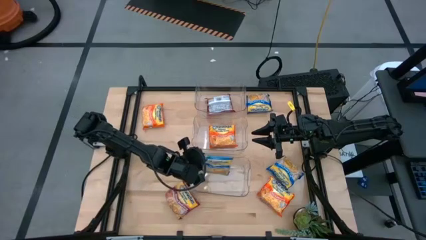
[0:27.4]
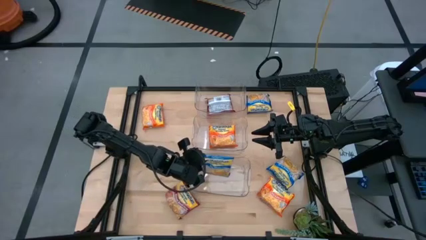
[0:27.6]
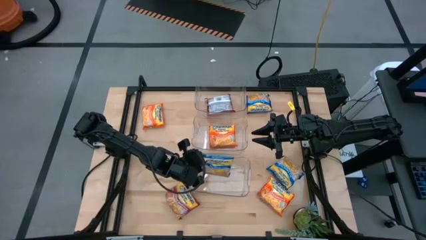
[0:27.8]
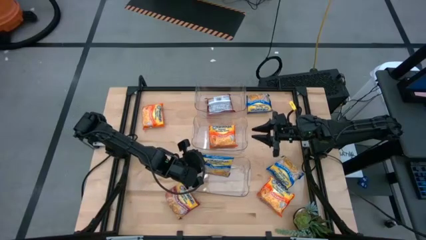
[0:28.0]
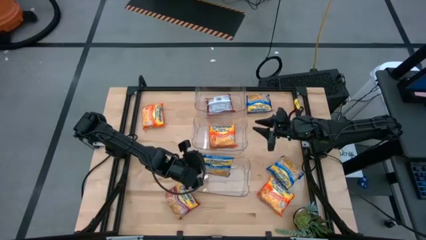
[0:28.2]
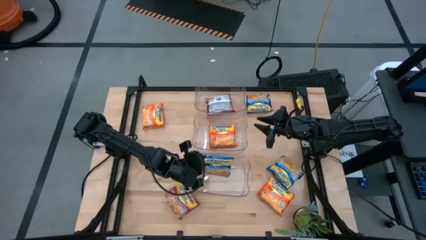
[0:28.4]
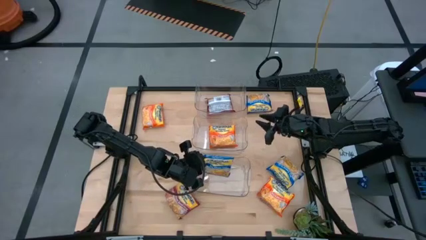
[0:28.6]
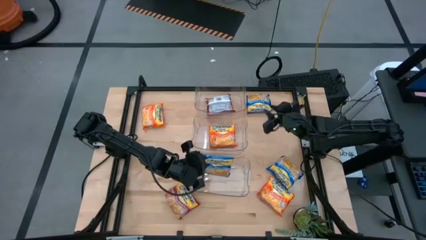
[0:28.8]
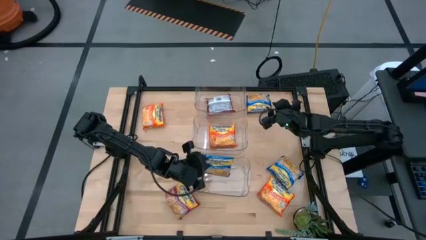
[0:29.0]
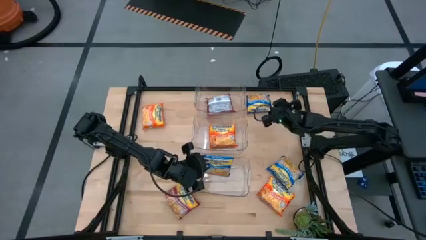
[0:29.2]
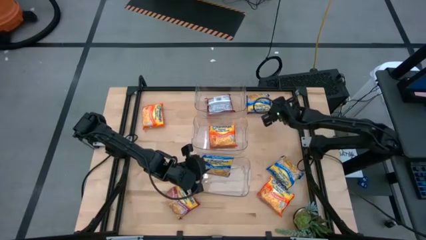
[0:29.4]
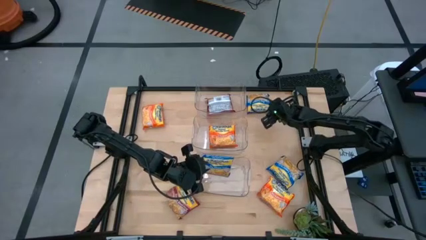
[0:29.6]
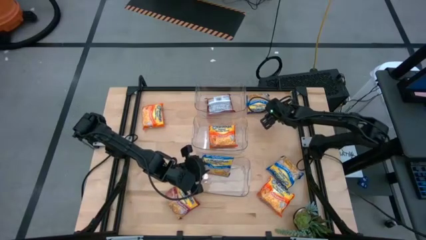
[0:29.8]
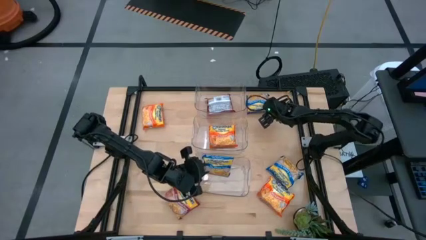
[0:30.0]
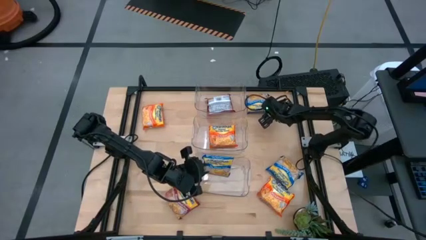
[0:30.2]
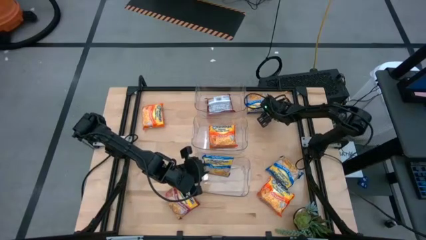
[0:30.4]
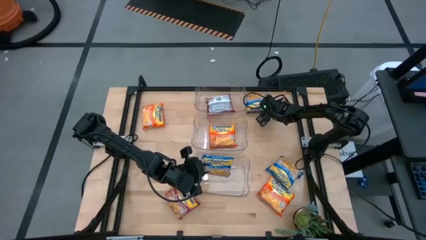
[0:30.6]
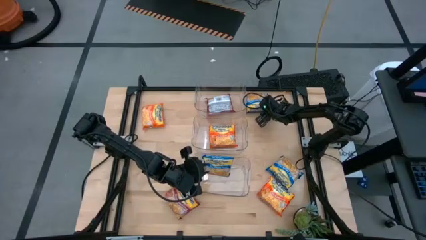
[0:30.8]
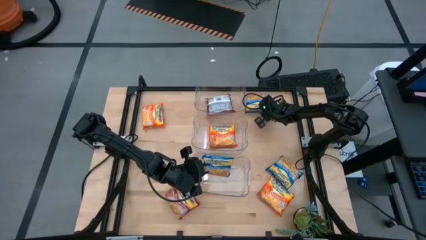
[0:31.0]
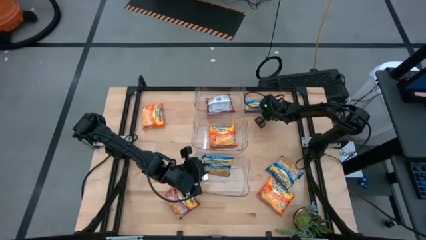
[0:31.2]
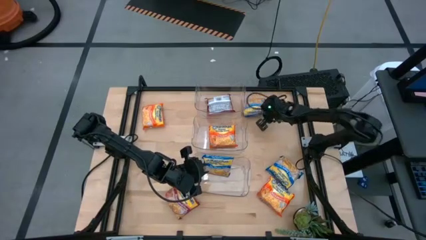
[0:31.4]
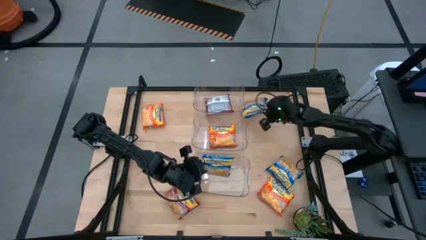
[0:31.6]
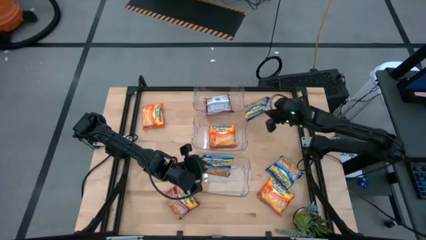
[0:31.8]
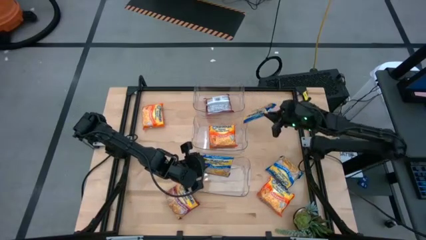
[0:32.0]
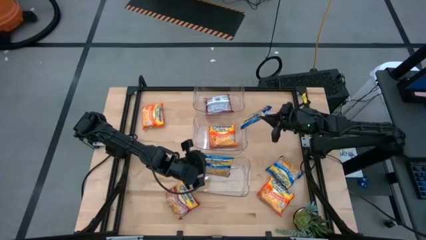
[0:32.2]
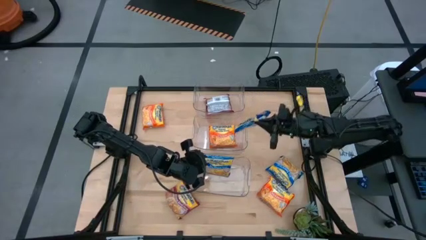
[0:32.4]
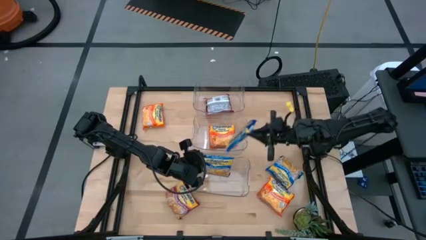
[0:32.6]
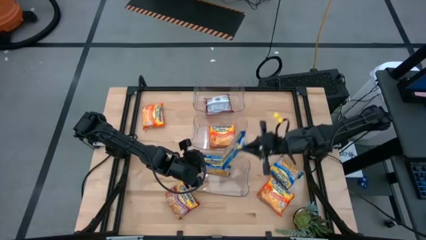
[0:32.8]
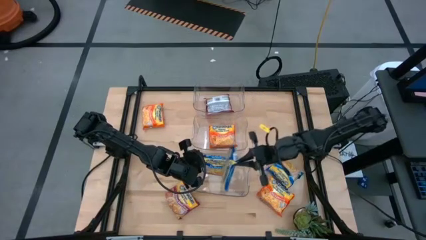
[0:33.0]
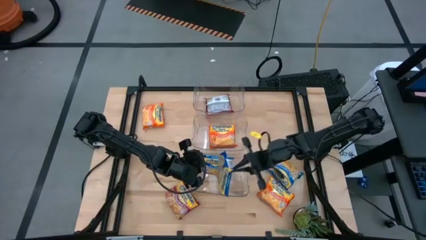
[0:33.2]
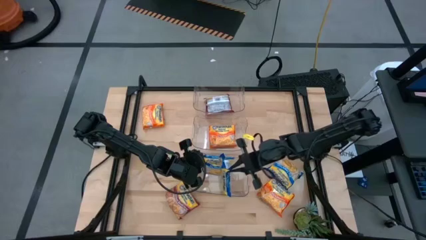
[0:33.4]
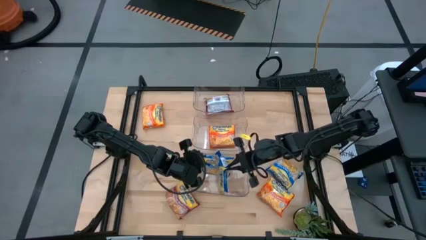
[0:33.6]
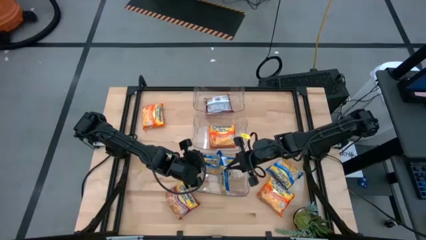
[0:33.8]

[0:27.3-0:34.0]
Task: Sort Maruchan noodles
Put the top blue noodle pack into the bottom transparent bin

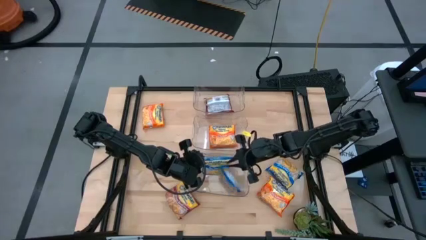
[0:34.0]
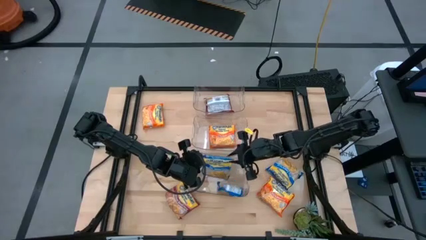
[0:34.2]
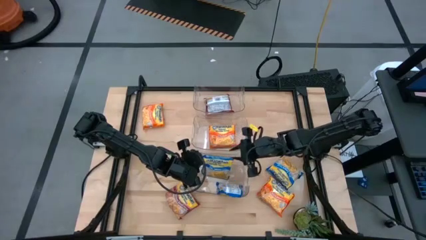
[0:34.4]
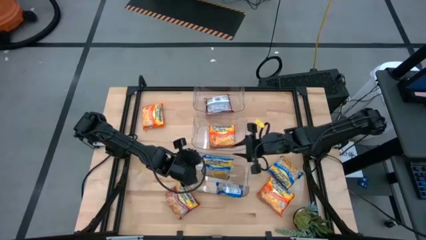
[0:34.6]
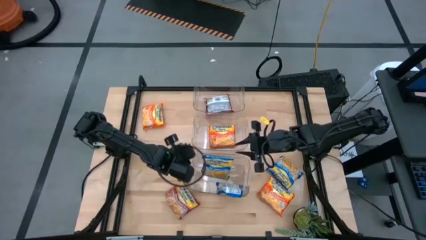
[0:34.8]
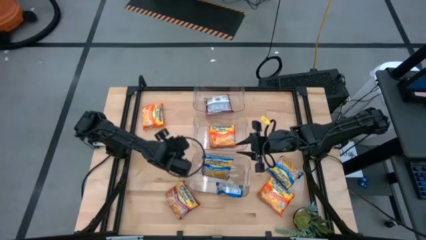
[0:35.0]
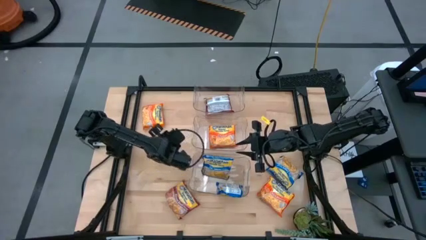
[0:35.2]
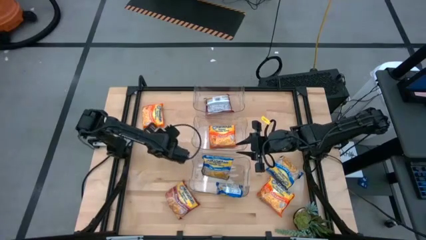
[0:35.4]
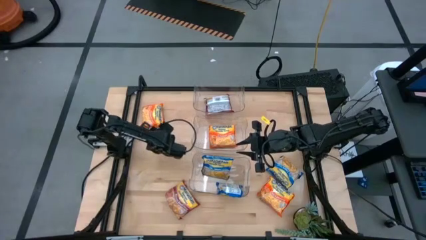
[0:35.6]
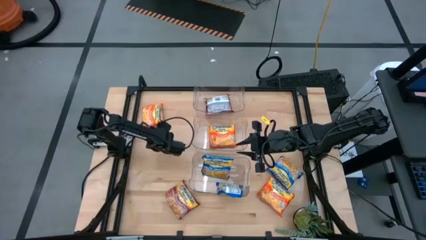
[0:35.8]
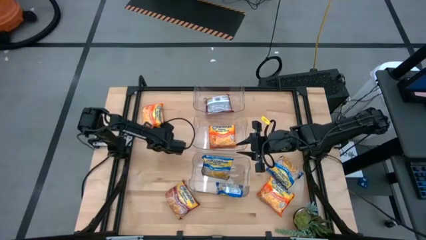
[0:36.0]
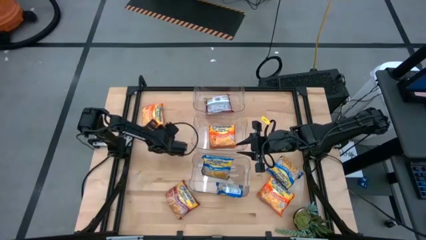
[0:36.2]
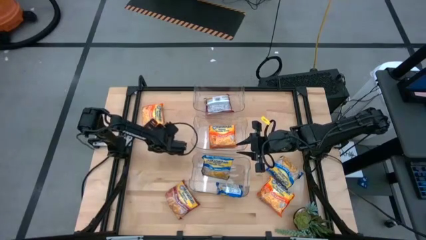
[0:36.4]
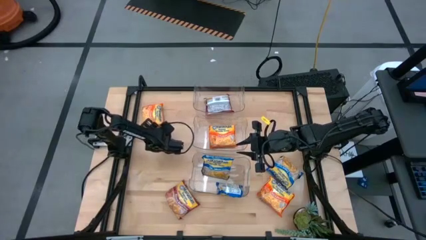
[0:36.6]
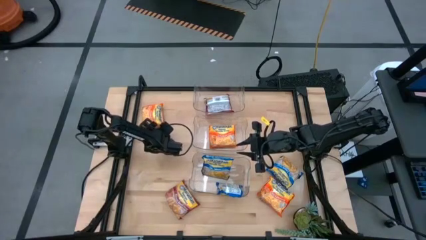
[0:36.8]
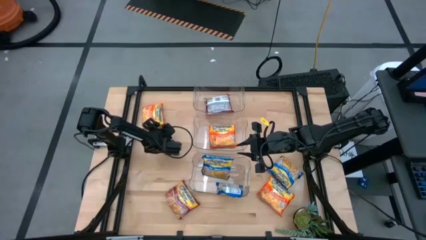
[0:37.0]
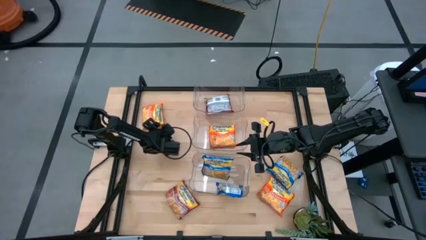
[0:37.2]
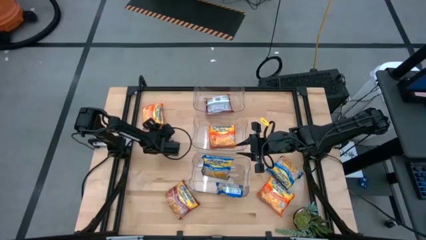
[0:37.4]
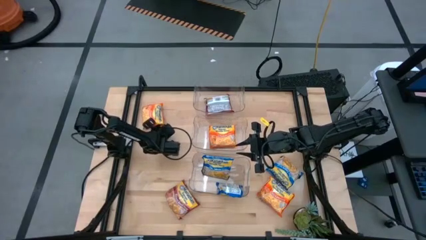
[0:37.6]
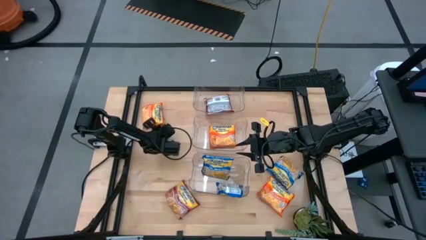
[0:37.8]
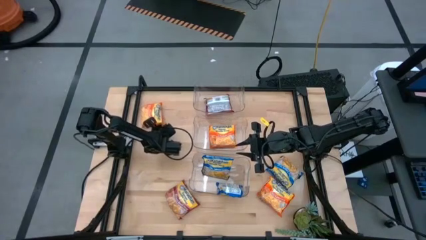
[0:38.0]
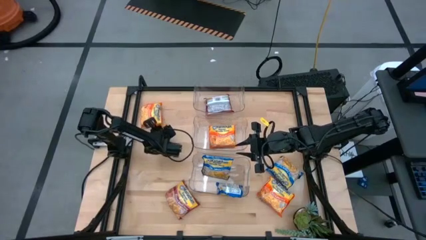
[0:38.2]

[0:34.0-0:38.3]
Put the top orange noodle pack into the center transparent bin

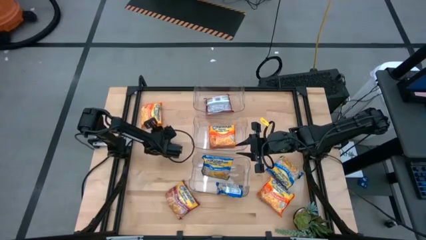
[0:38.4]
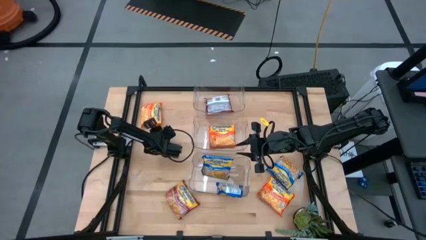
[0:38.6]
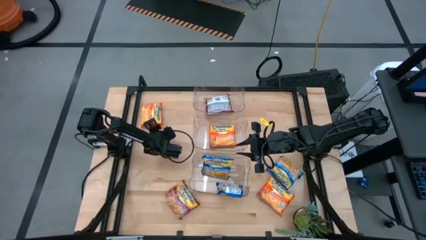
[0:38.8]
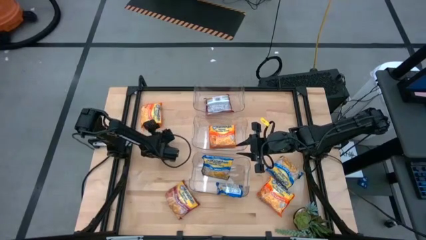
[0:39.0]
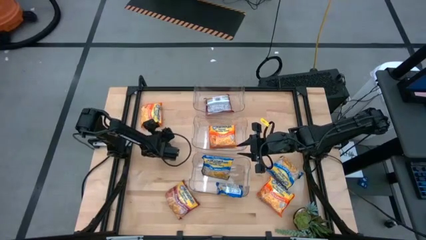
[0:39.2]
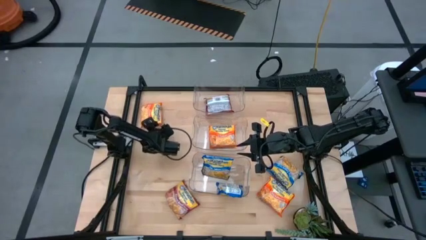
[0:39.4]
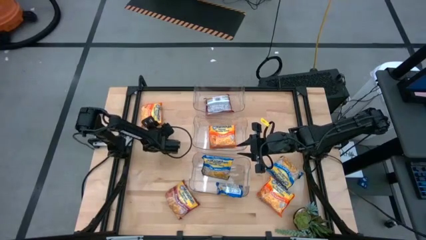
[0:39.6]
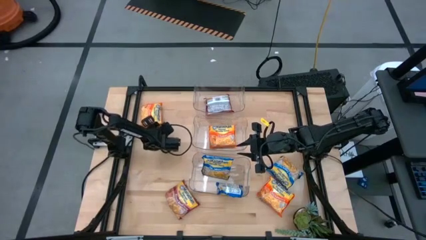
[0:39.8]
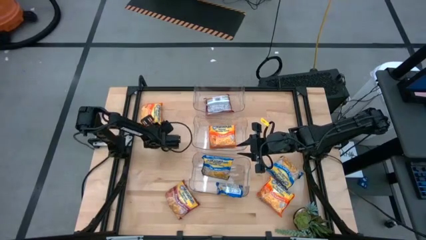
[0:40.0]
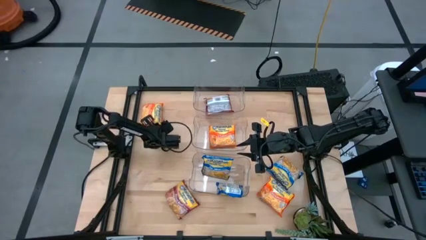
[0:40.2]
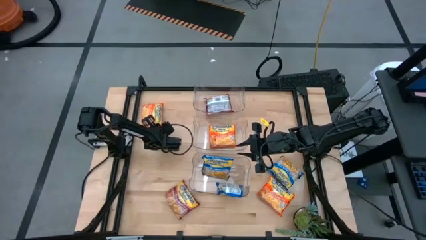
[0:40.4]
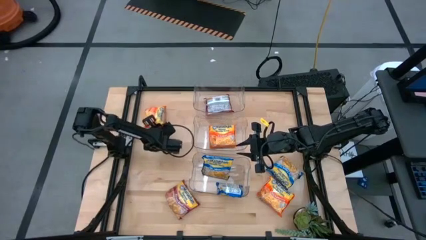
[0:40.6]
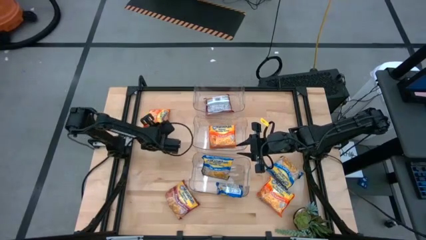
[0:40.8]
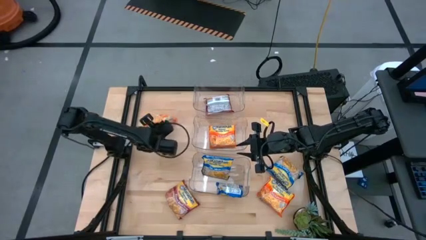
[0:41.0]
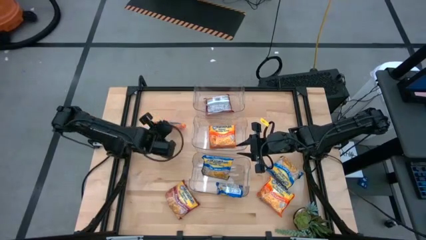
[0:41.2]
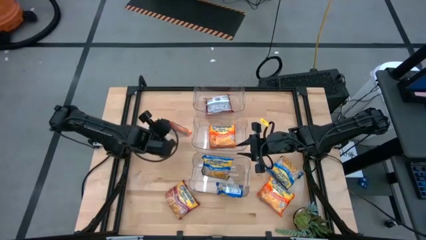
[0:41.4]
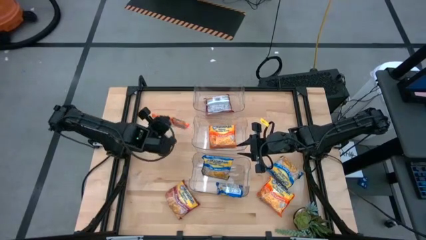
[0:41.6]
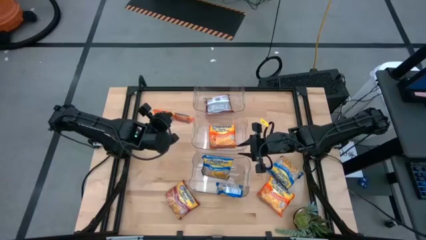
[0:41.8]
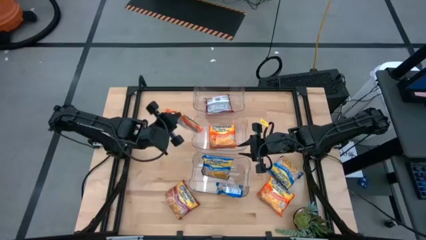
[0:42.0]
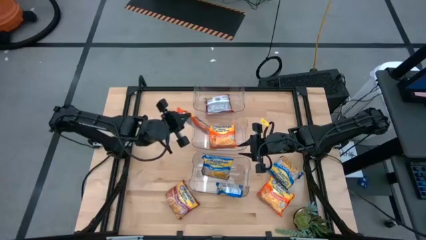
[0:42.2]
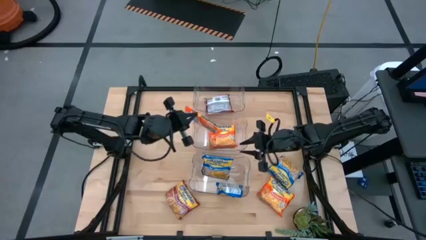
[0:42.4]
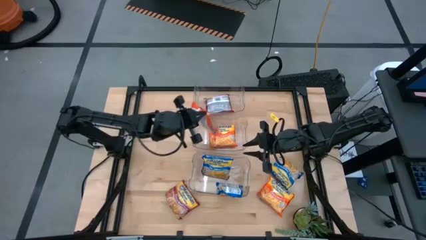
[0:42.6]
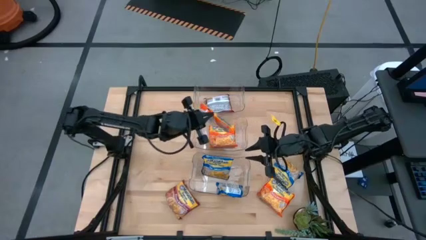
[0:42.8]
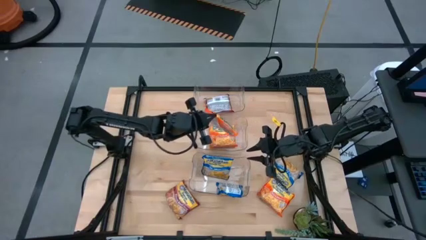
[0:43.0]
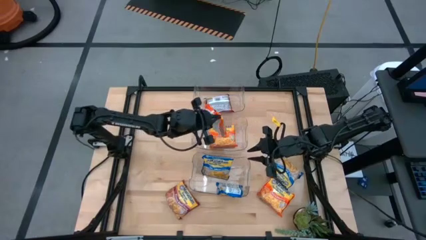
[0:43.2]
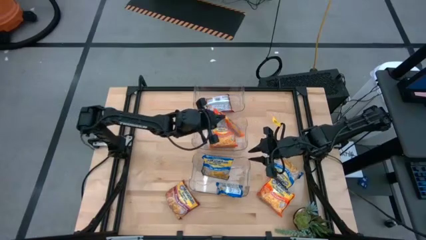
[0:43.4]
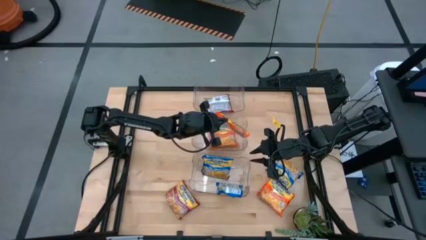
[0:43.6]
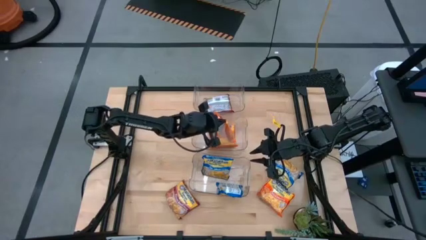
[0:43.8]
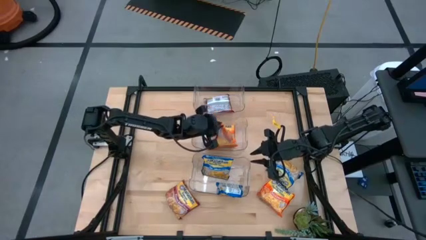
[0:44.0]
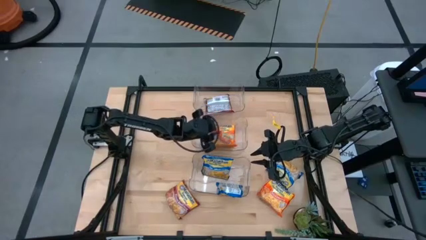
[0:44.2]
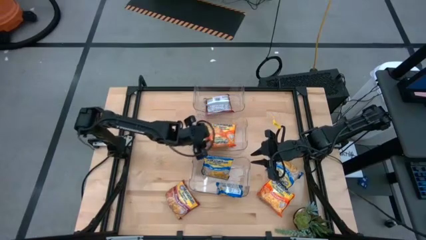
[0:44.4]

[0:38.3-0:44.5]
Put the top orange noodle pack into the center transparent bin
